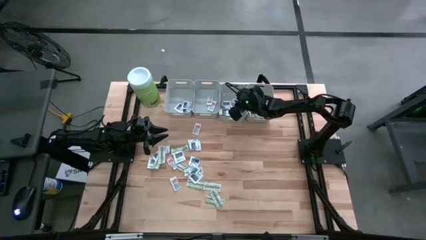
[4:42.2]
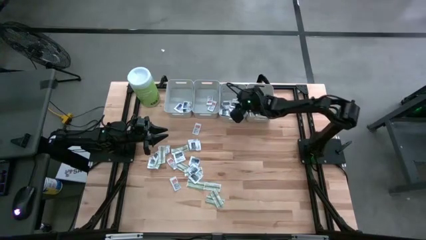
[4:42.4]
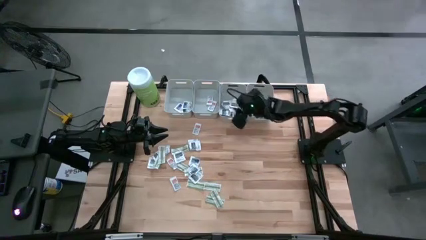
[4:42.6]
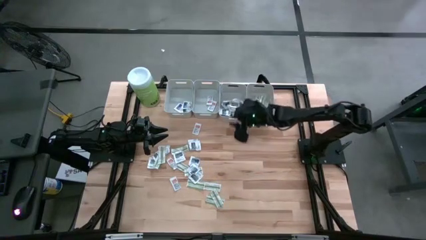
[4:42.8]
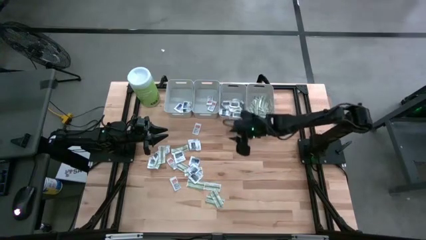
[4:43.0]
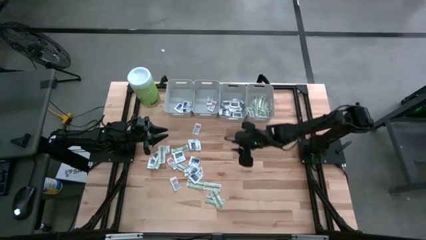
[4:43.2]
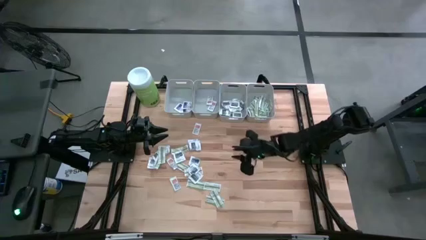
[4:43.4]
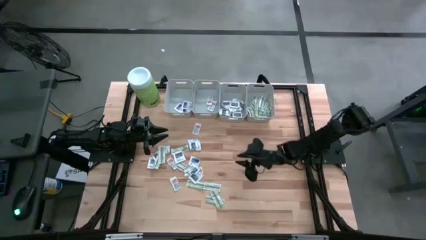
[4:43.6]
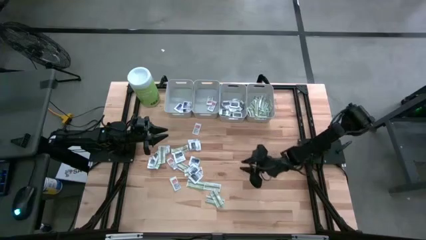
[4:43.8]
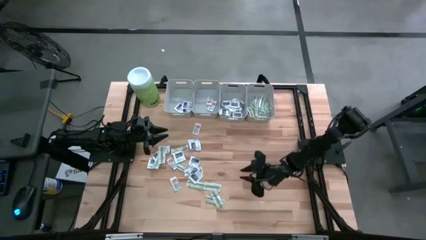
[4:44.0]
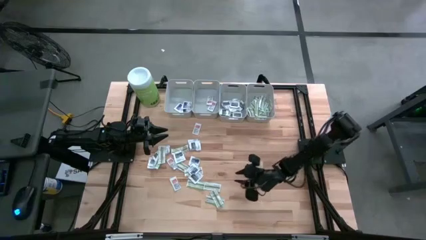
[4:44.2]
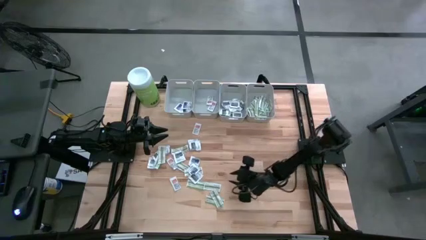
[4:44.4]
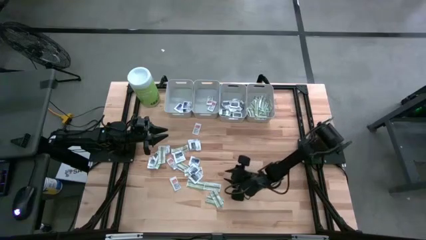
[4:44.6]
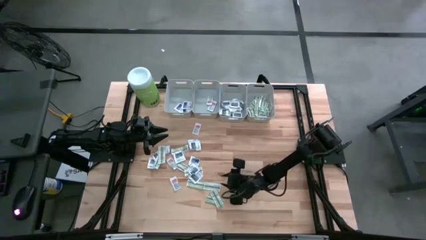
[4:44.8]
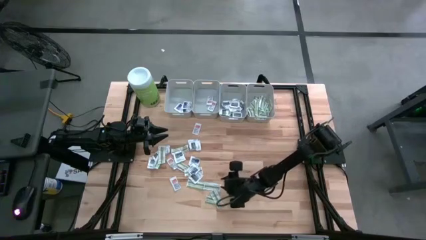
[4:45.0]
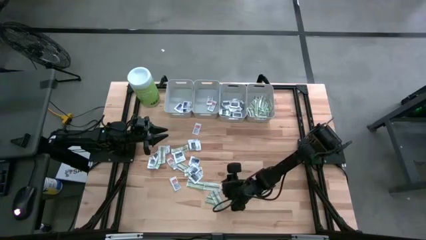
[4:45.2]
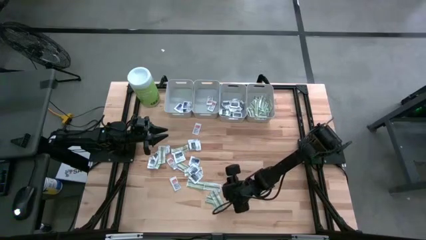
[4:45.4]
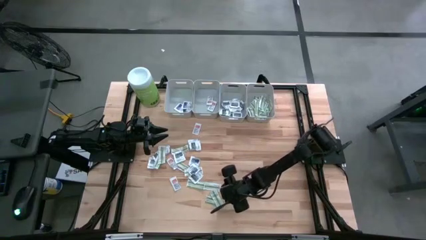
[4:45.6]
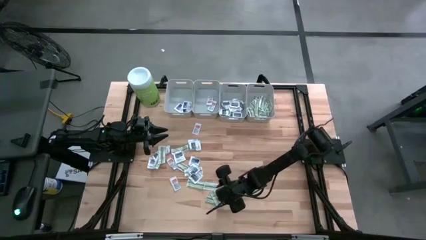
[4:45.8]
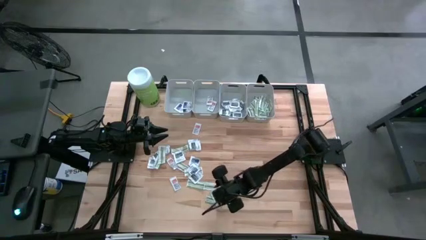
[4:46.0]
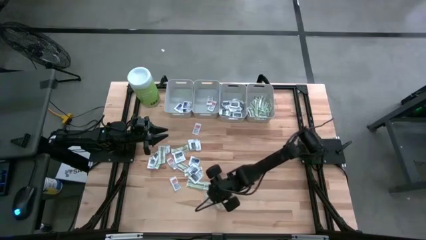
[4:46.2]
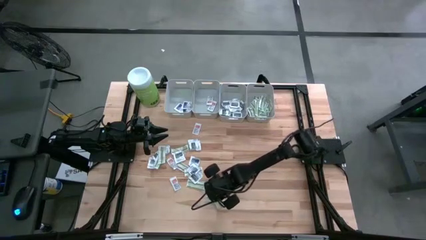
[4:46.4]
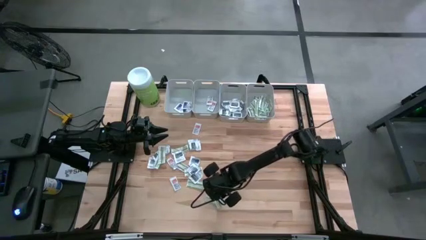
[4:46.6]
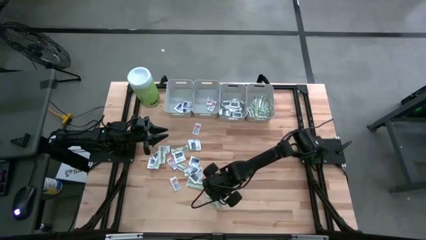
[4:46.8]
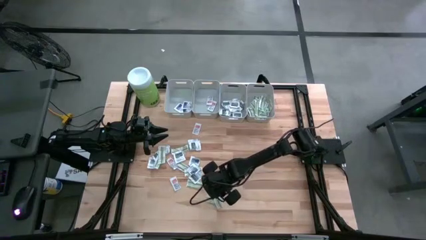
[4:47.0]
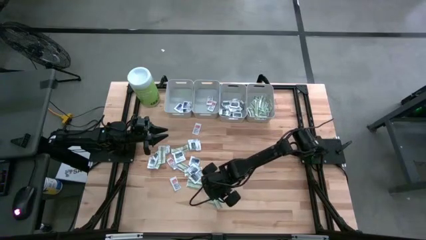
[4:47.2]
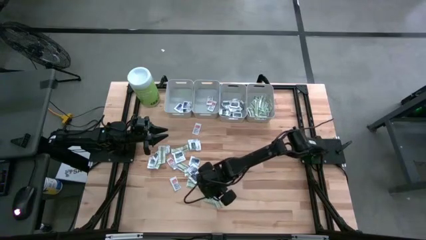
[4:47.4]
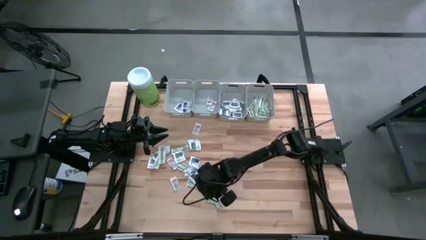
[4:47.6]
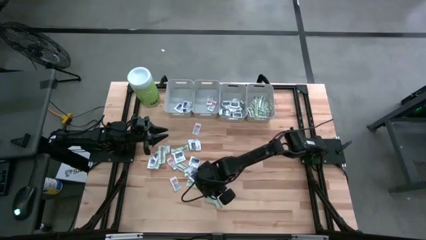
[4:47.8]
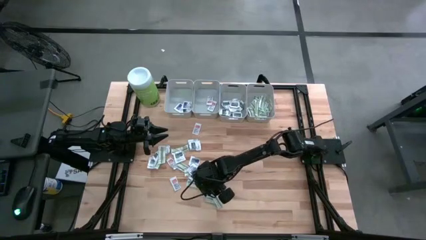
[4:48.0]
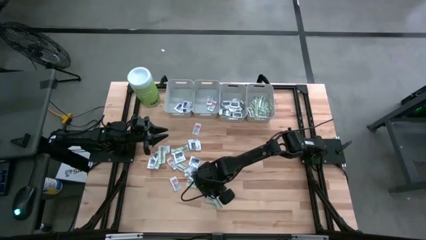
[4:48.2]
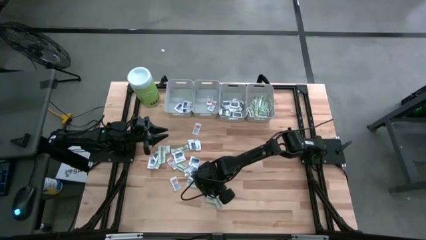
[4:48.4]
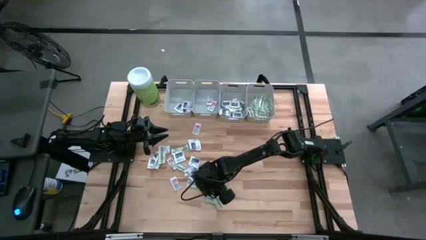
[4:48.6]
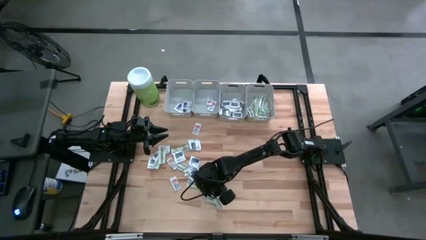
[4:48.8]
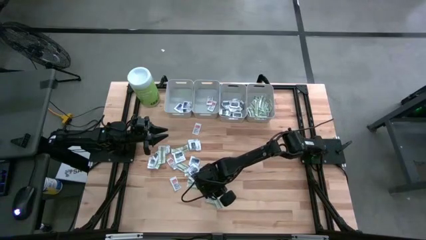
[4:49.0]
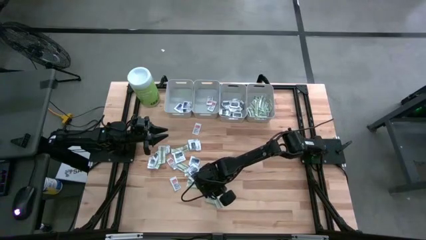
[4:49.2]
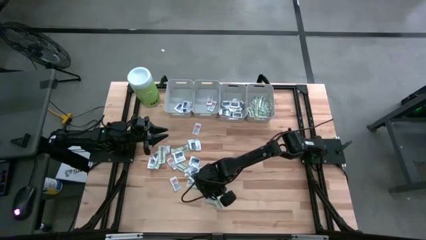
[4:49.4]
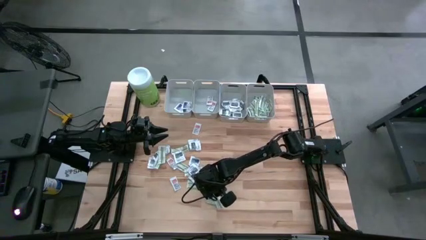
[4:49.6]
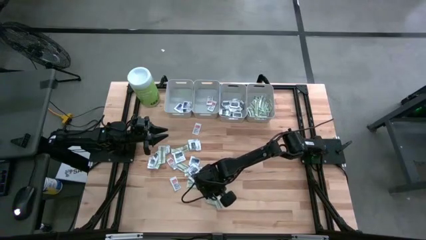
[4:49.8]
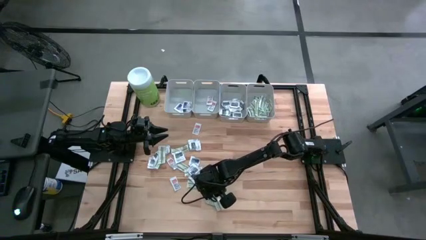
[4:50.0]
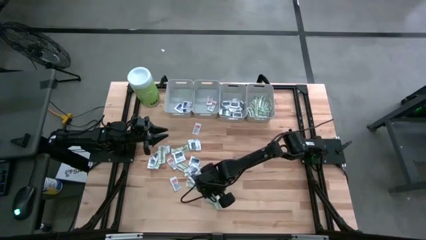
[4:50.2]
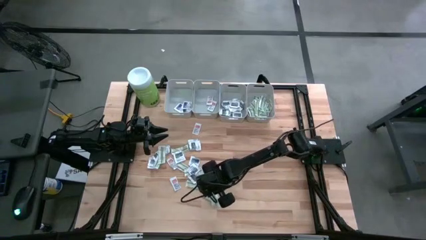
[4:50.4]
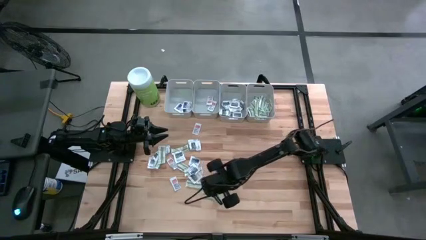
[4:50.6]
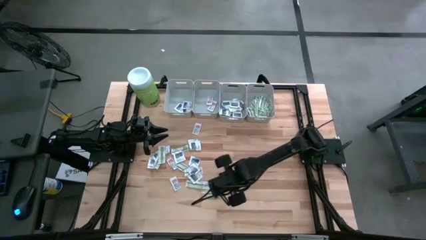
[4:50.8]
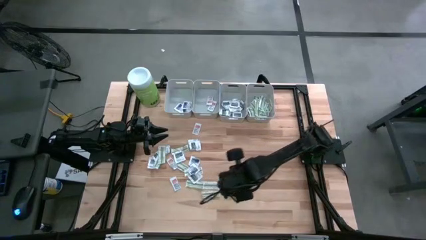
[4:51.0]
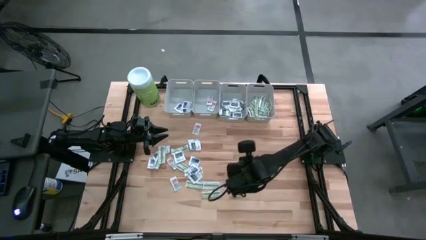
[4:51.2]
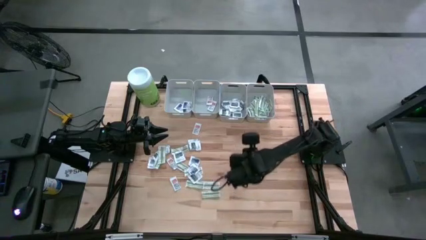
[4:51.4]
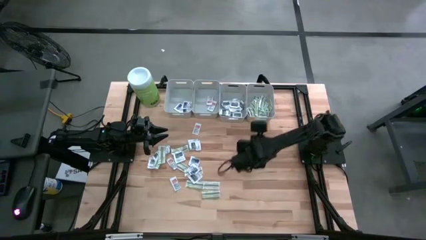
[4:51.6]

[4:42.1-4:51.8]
Task: Pick & Place First Aid Supplies
Put the bandage into the right gray bin

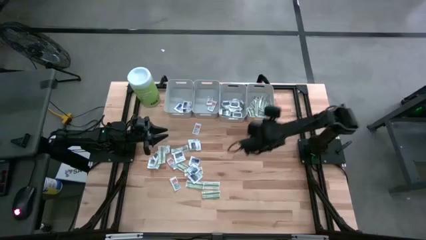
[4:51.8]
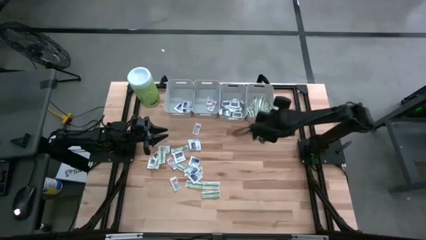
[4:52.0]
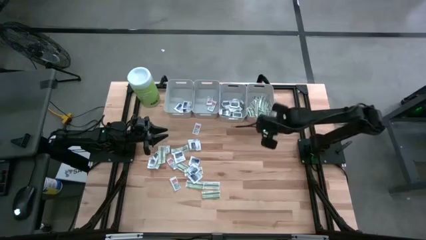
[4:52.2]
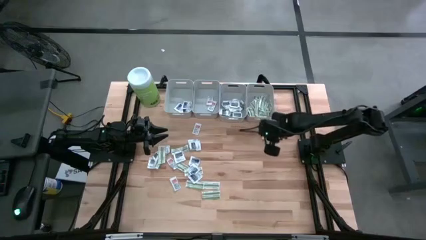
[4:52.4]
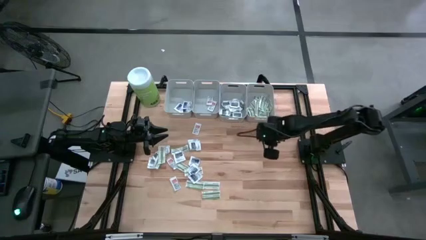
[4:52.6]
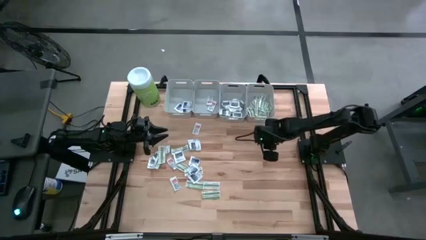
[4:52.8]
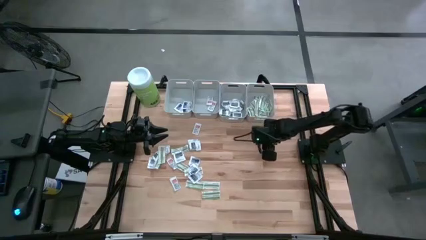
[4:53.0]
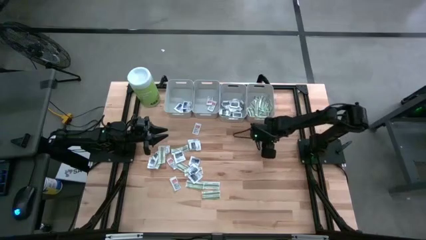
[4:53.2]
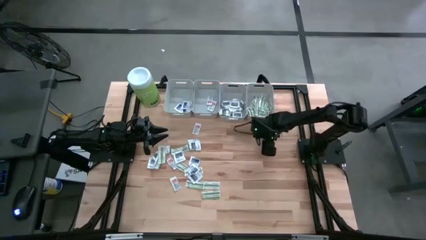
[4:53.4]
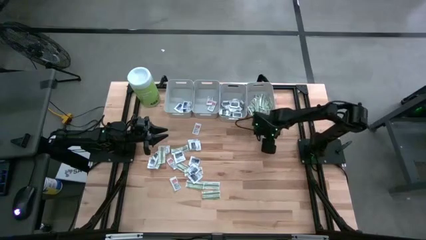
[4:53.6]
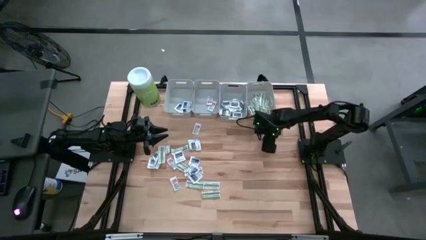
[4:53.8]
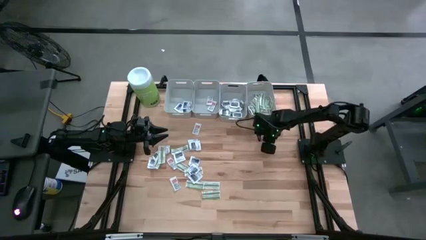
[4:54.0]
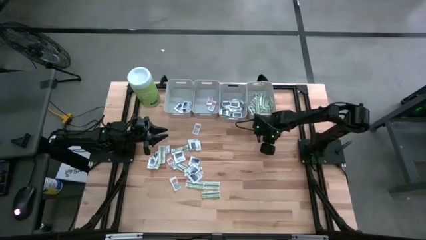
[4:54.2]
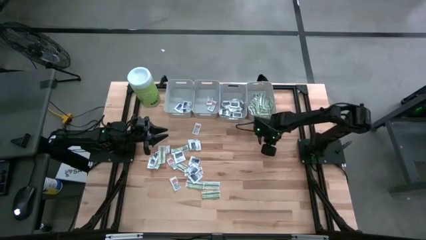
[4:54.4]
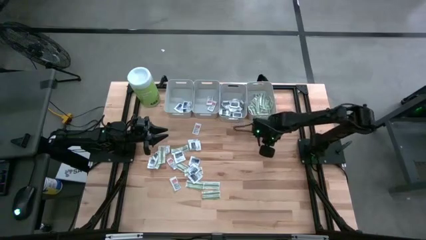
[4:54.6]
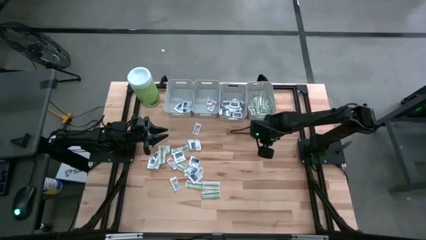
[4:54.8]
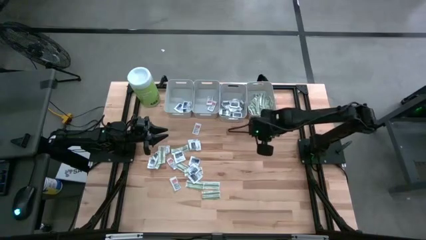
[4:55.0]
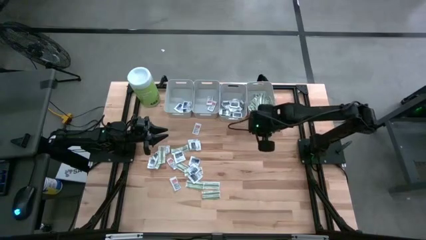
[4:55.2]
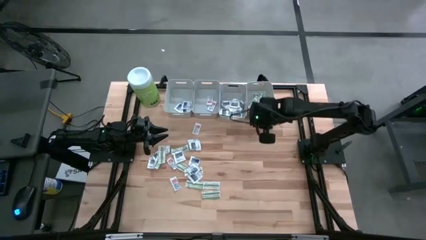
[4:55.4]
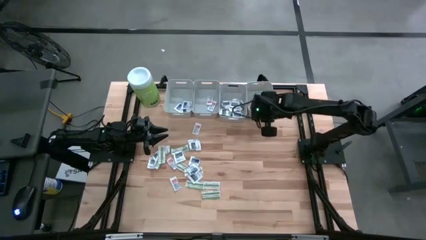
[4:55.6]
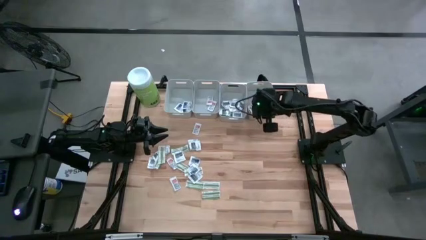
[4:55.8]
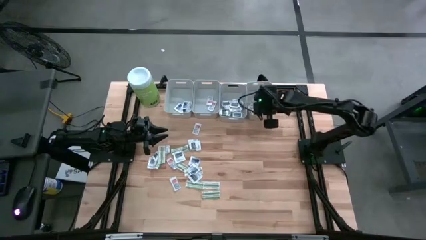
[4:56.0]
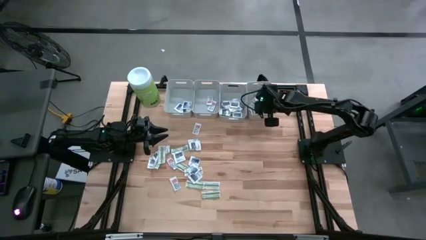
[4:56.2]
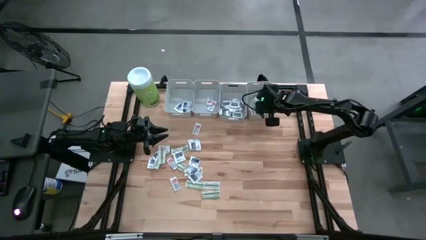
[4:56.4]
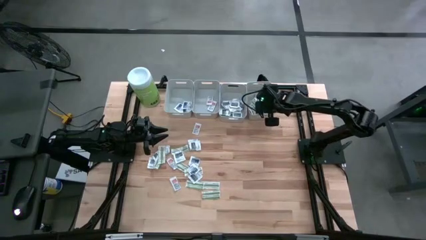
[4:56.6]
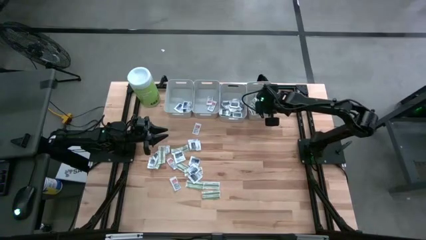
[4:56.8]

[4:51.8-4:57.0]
Put the bandage into the right gray bin

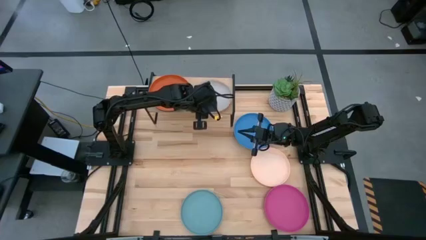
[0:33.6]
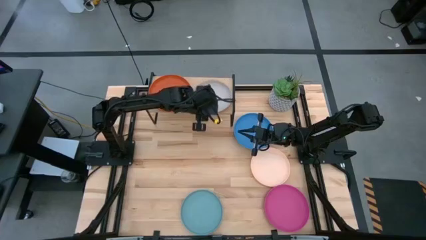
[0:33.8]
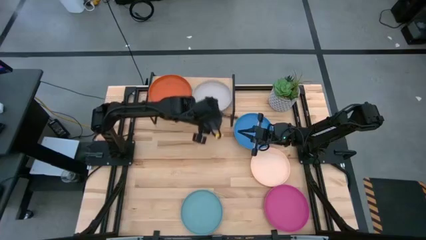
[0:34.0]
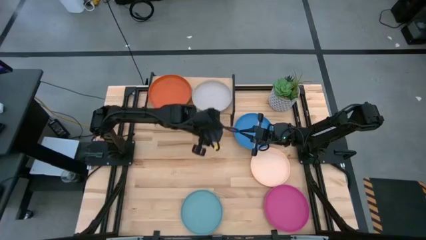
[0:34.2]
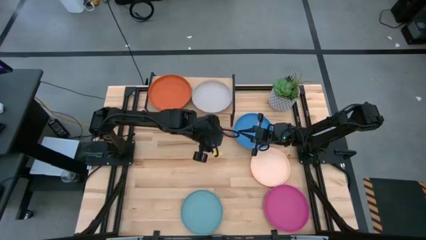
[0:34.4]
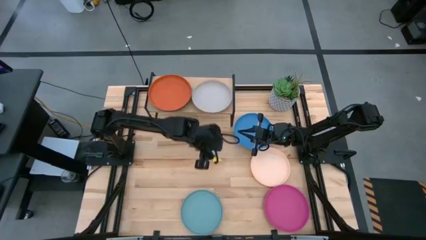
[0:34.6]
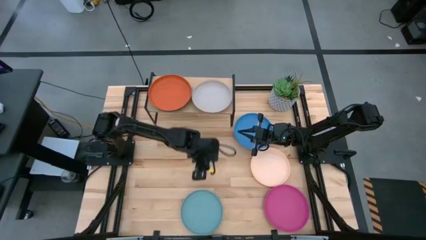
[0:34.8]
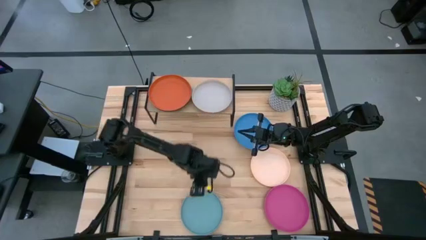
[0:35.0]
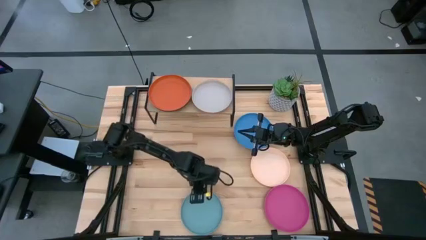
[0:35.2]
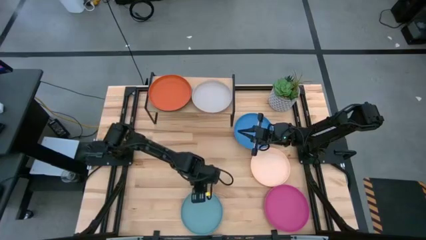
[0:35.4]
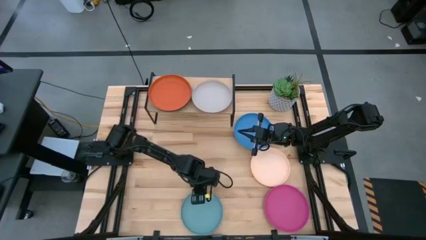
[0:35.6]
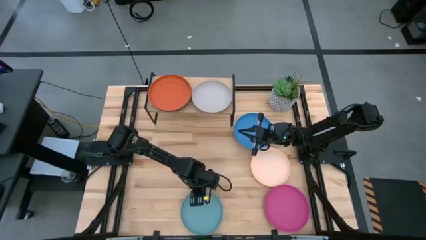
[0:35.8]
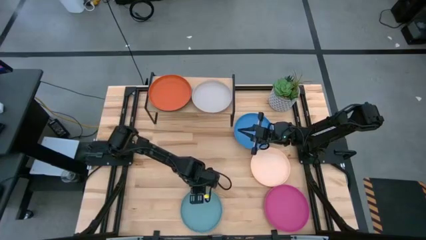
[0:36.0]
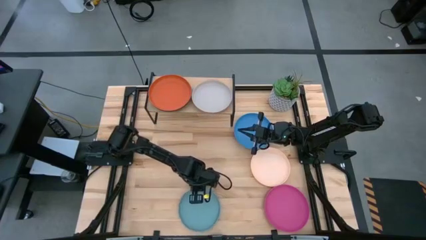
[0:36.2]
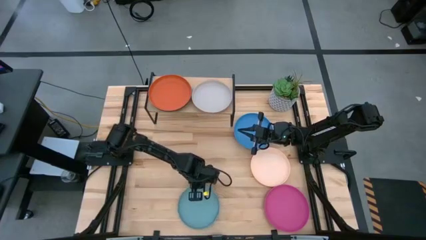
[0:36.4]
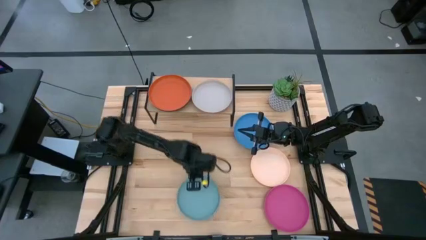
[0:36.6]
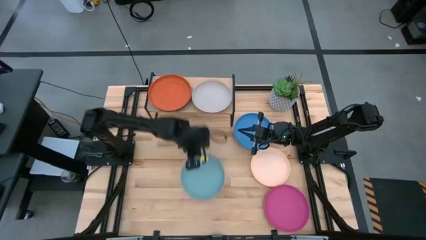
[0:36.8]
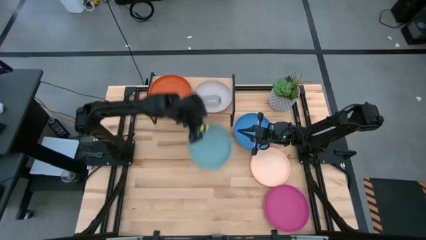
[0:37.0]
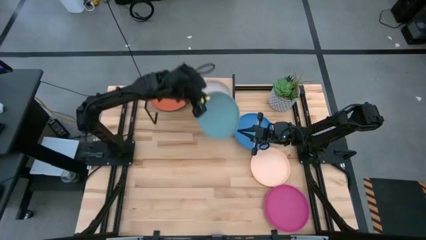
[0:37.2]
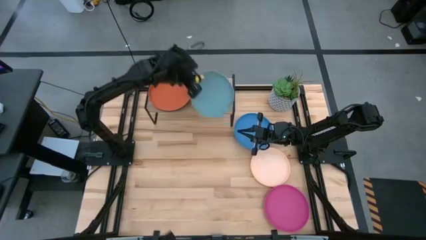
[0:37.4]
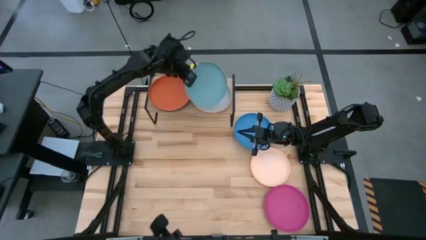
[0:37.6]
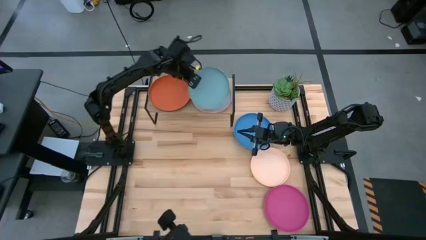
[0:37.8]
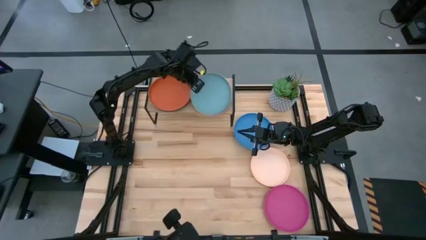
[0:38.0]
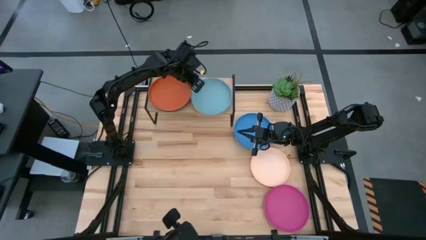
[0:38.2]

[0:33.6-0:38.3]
Task: Place and stack plates onto a shelf
Stack the light blue plate on top of the gray plate on the shelf
